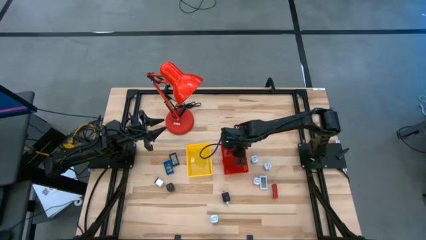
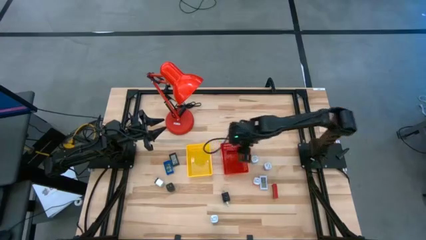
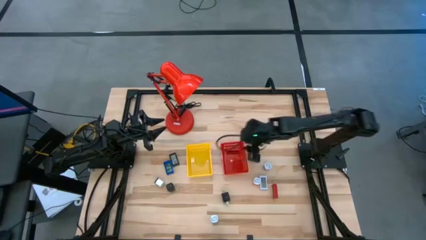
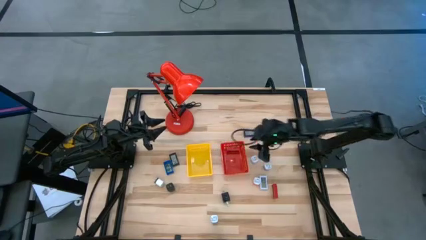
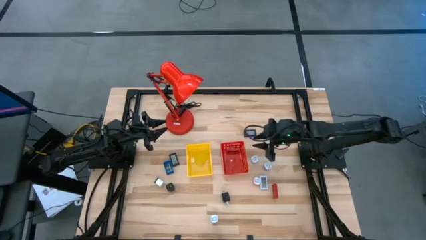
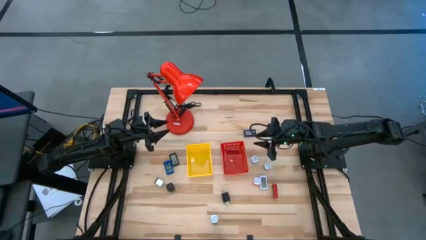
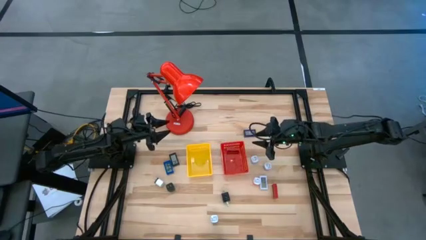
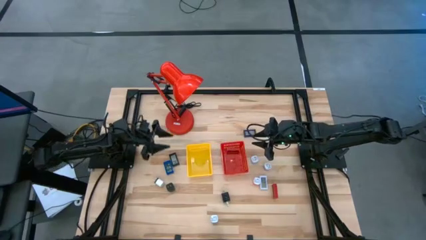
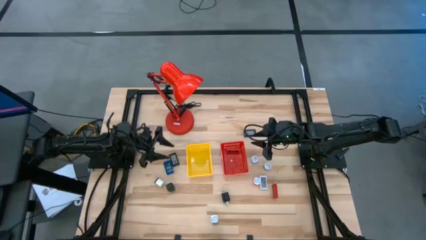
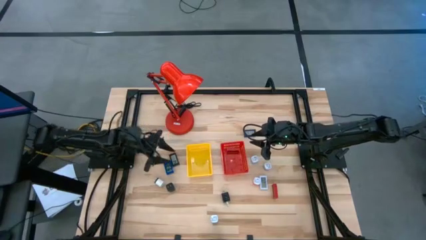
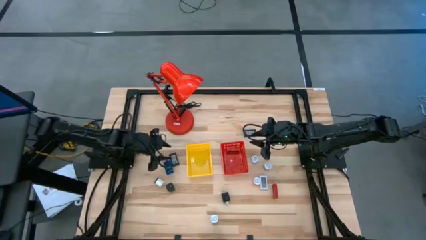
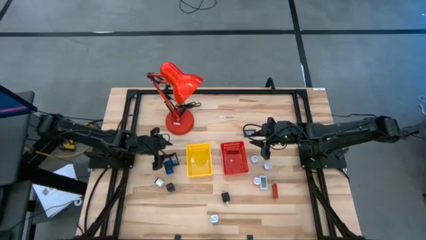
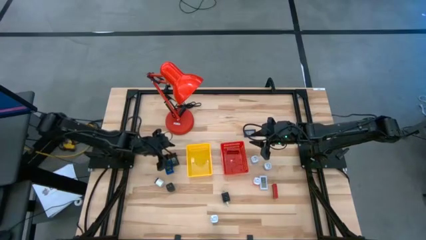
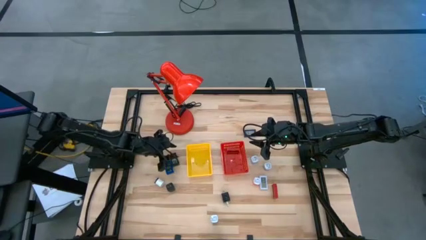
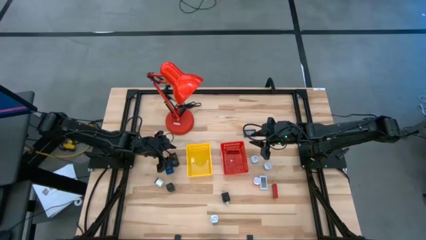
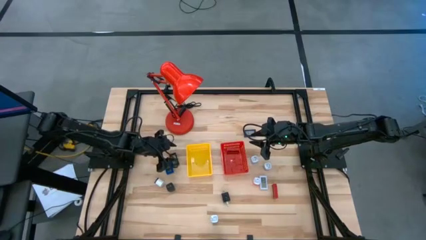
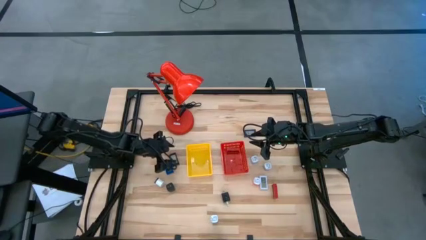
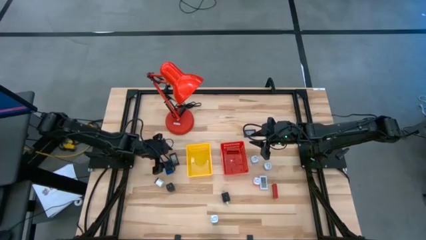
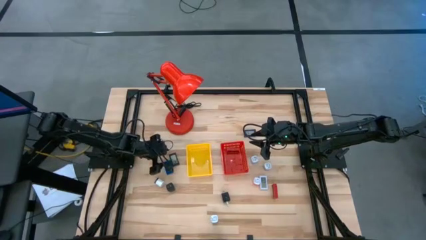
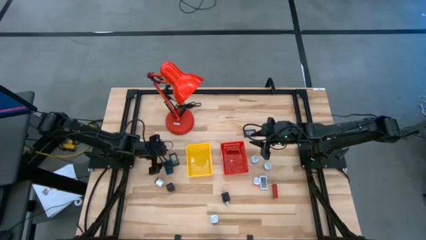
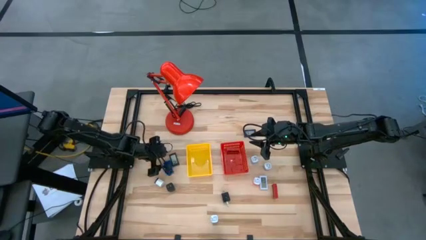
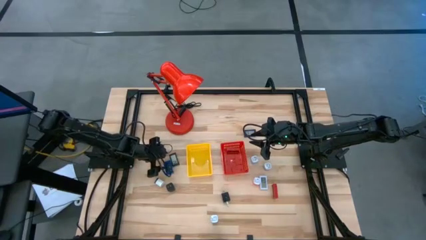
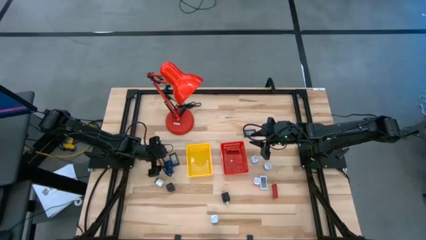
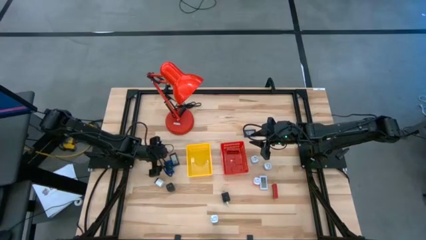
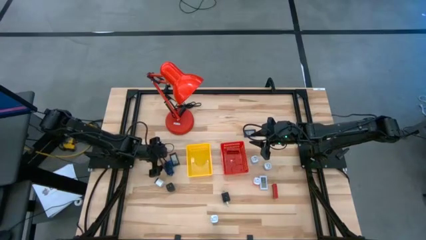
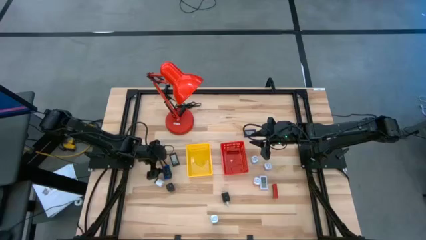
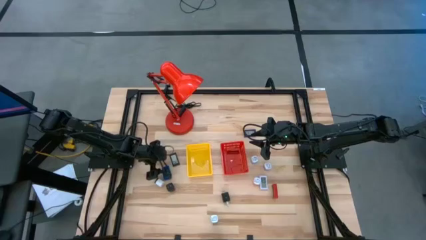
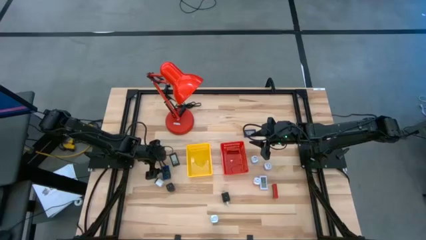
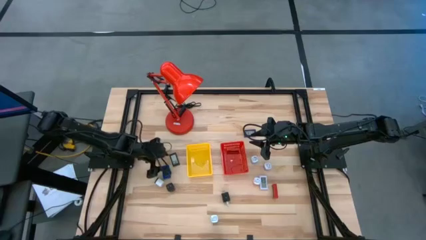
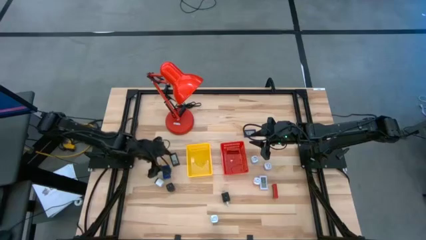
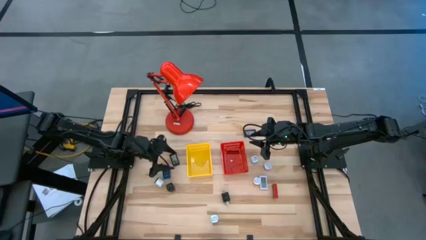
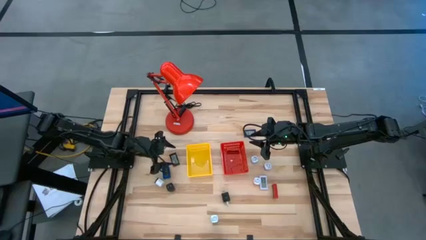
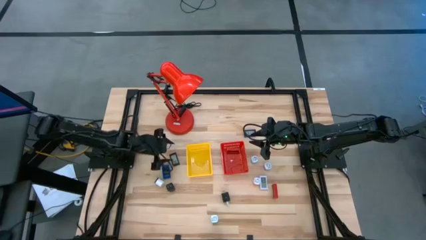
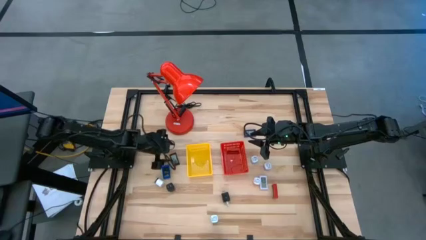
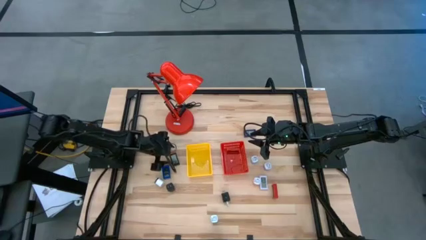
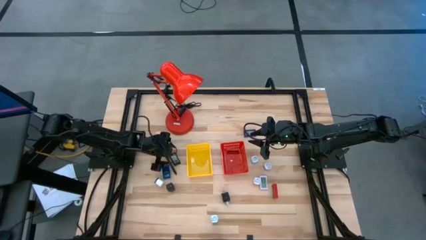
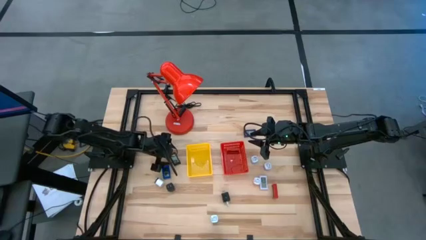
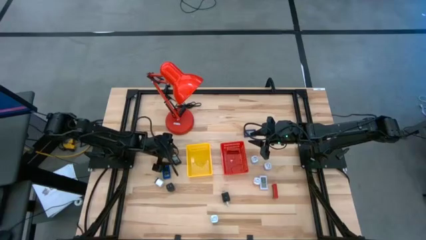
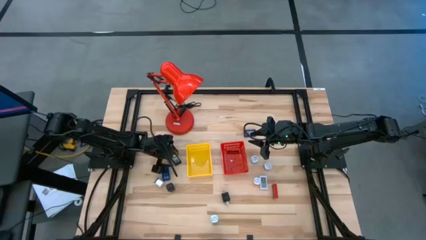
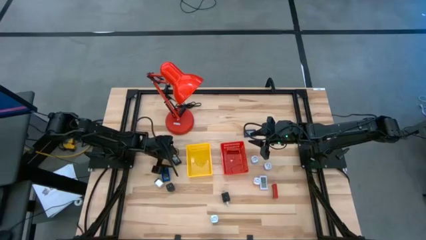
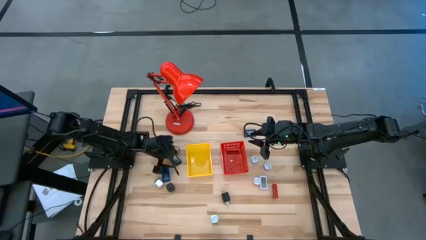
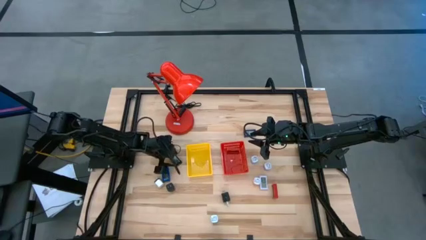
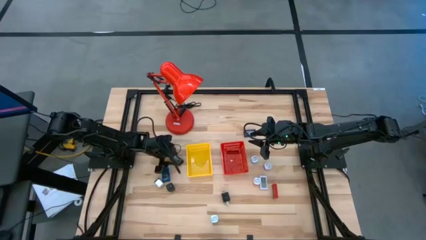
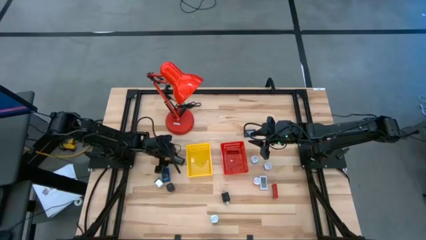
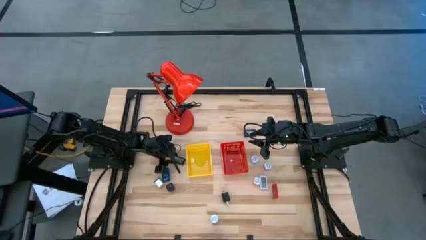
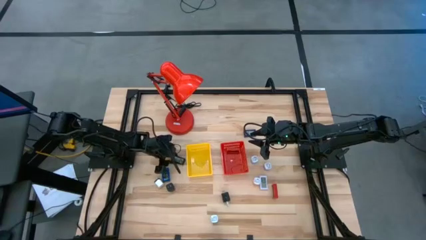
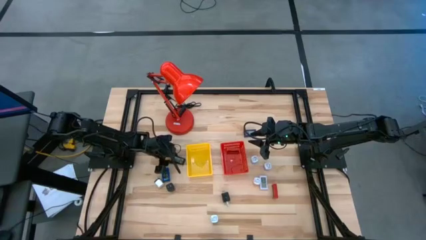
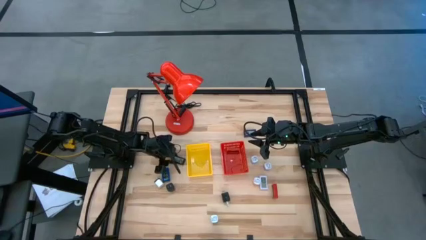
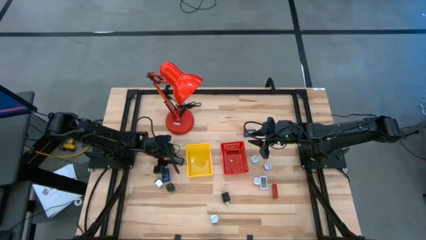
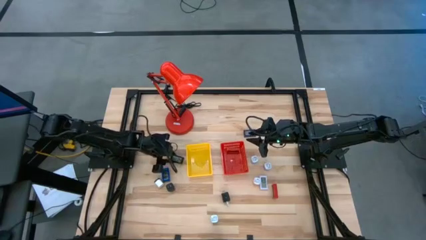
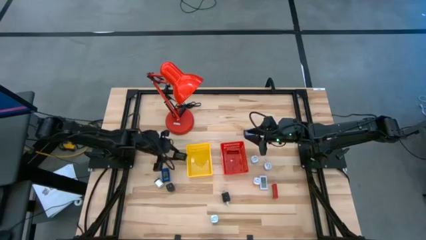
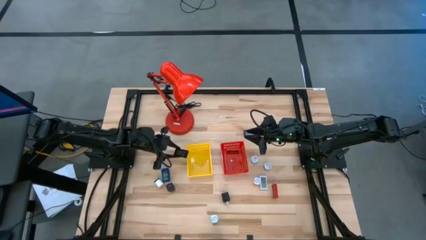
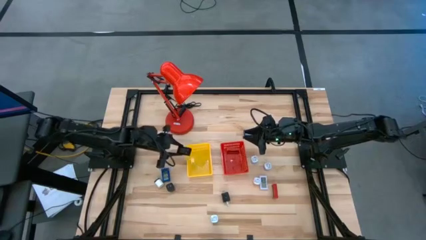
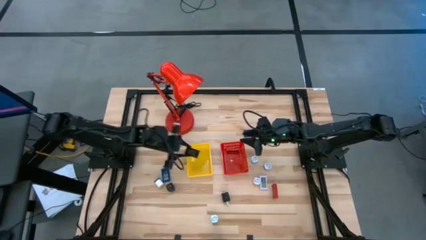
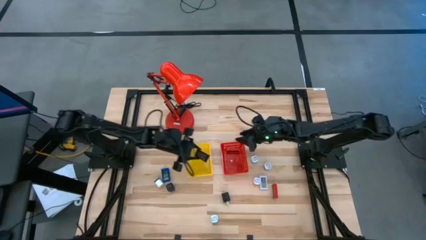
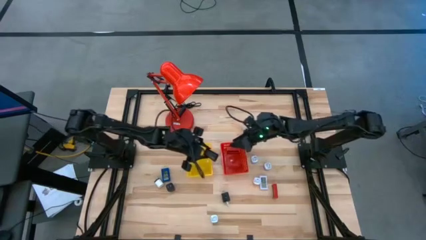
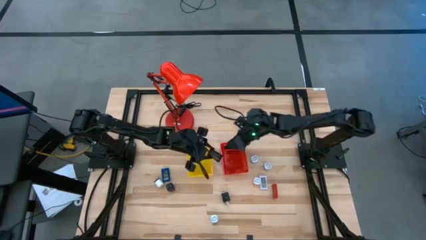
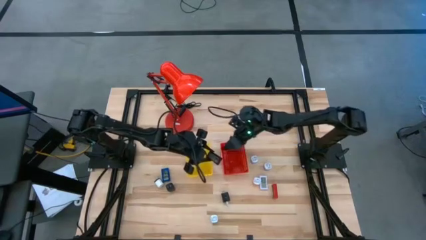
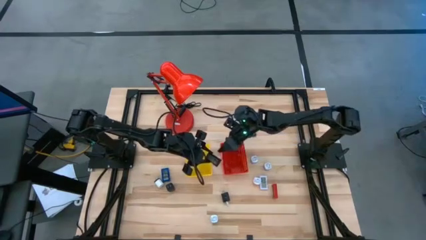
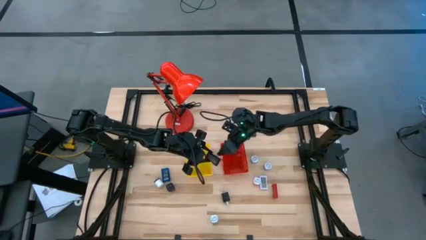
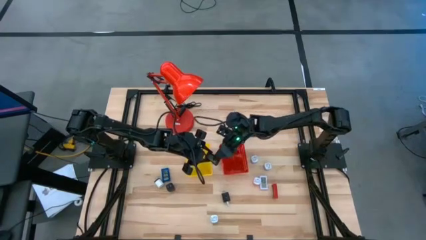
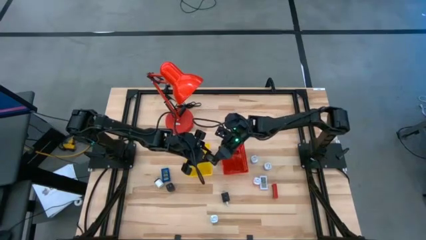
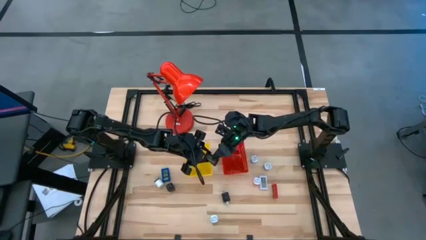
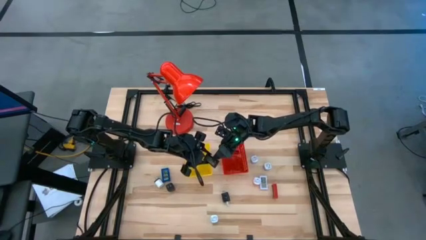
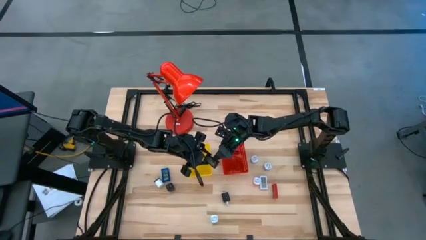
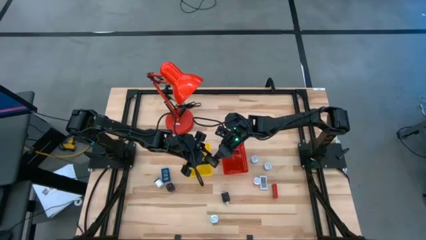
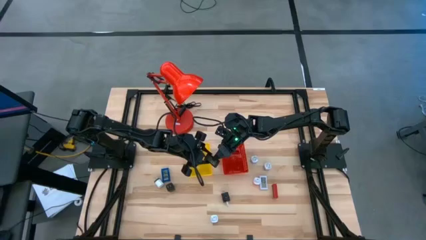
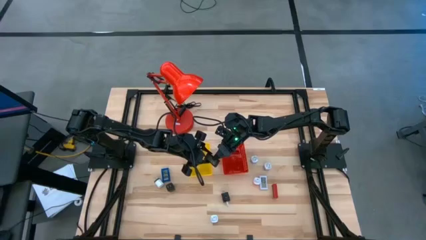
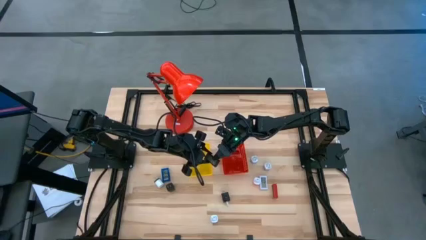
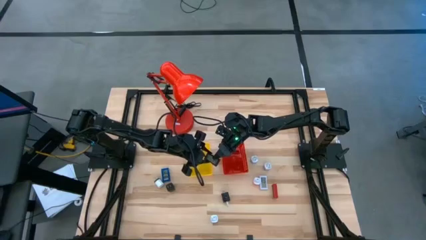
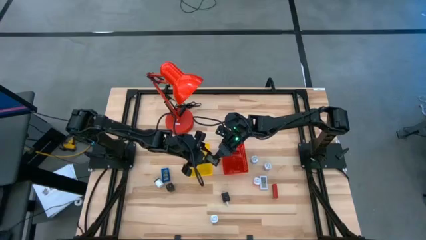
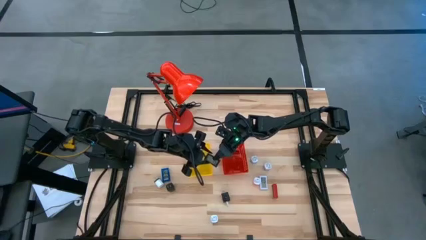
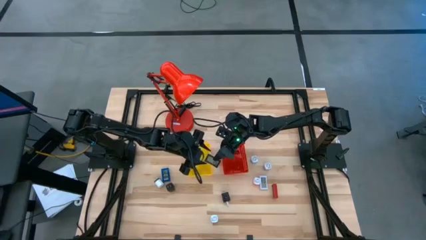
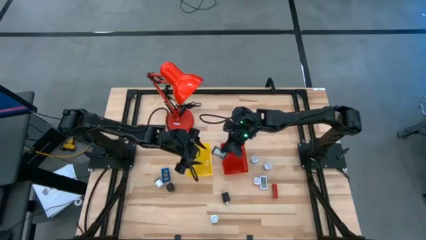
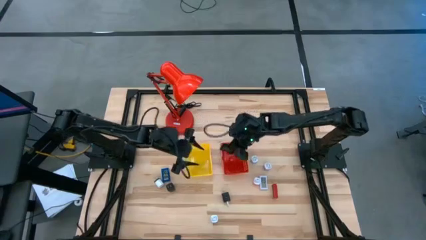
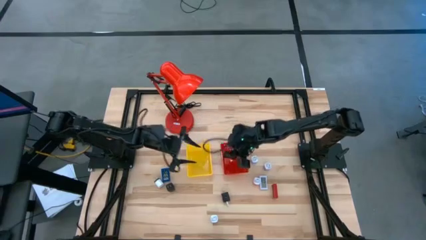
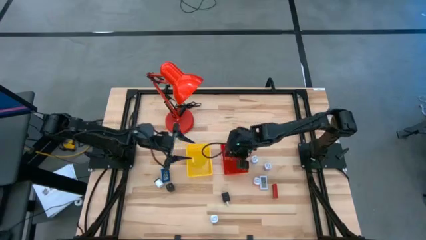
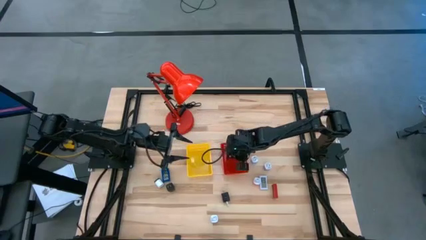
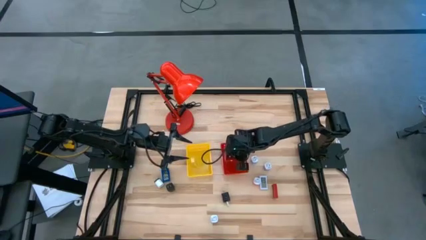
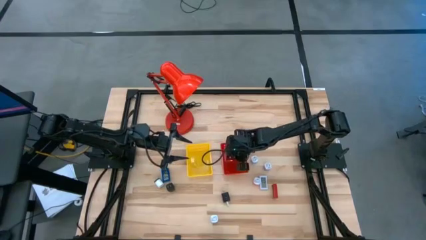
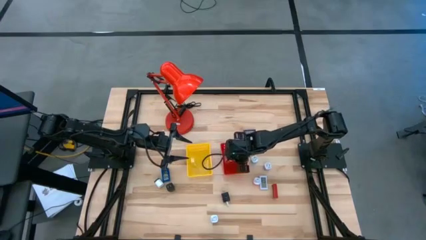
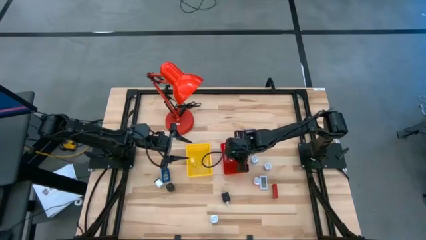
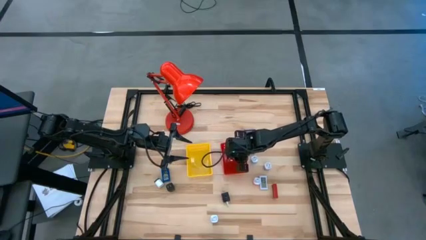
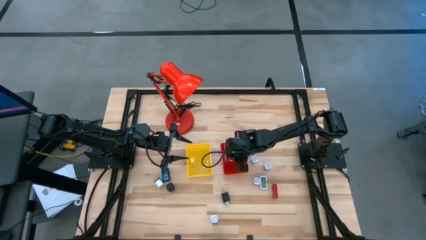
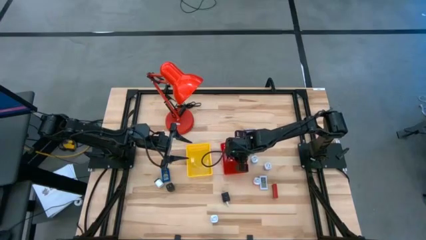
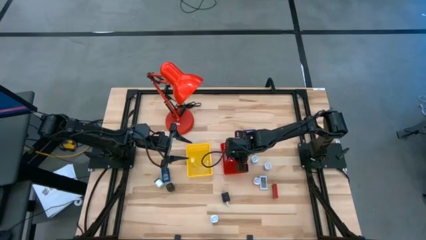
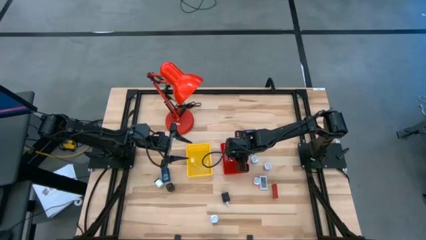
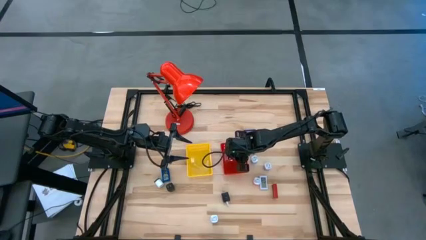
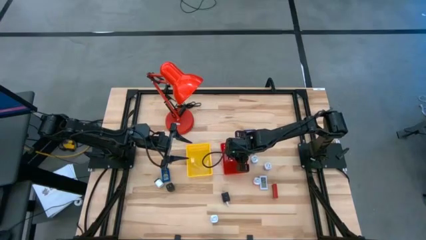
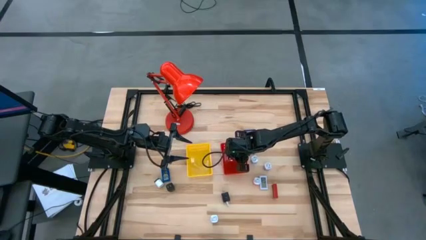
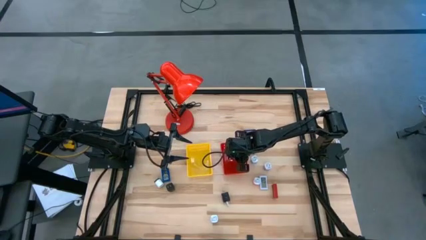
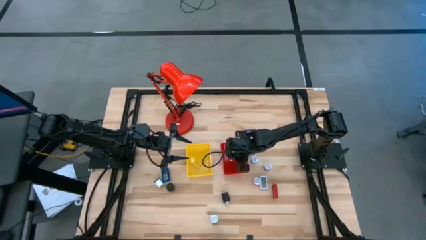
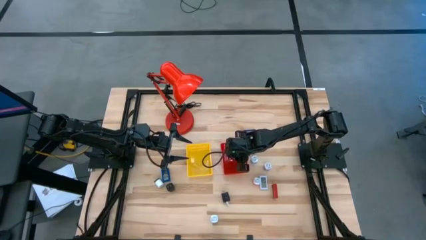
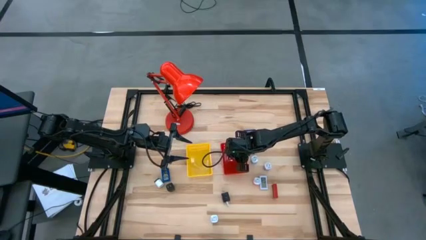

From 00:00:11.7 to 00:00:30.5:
Task: Pick & Place Office items
Put the black digital timer into the red bin
